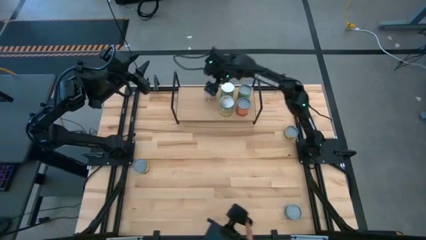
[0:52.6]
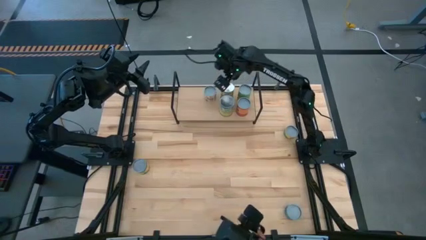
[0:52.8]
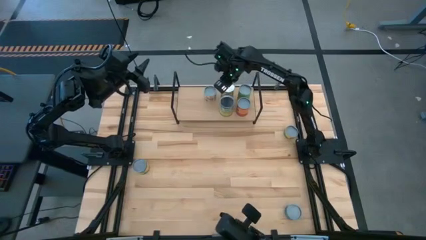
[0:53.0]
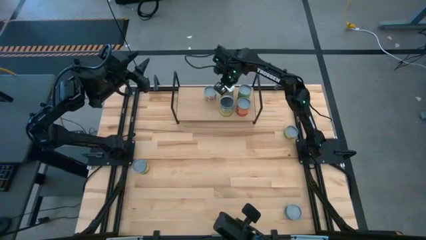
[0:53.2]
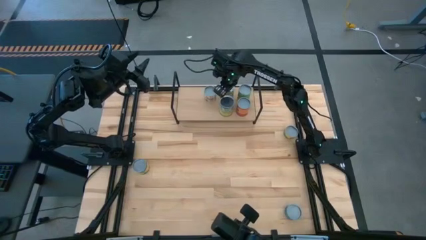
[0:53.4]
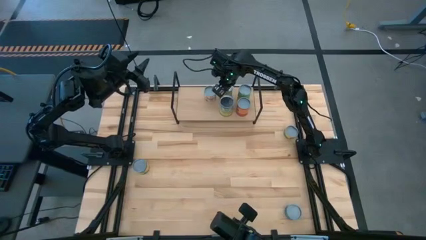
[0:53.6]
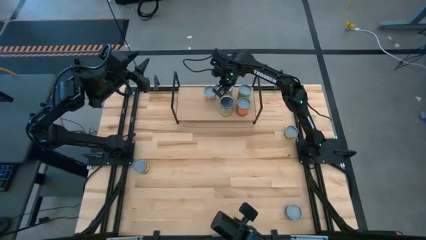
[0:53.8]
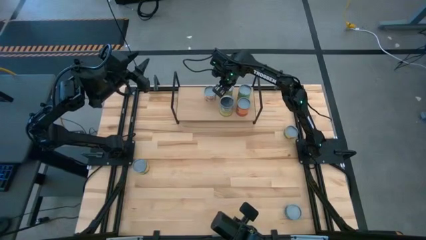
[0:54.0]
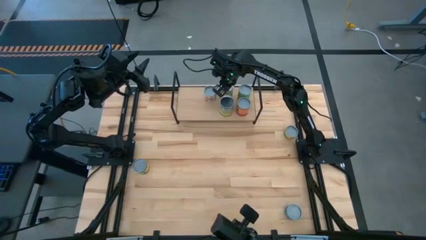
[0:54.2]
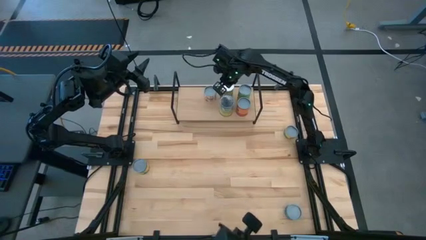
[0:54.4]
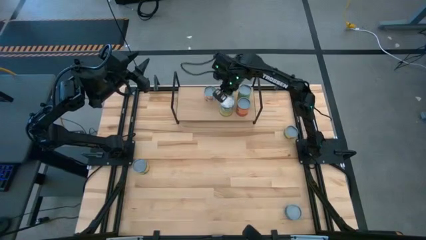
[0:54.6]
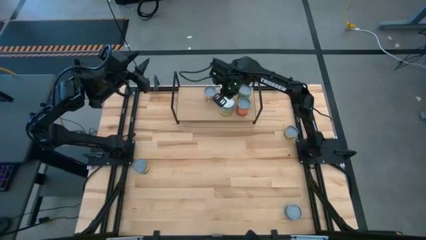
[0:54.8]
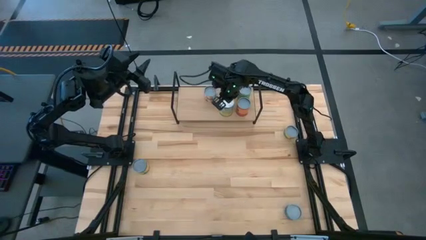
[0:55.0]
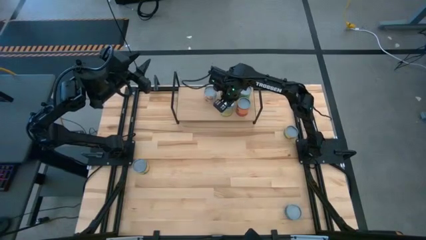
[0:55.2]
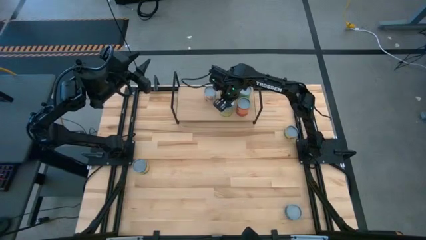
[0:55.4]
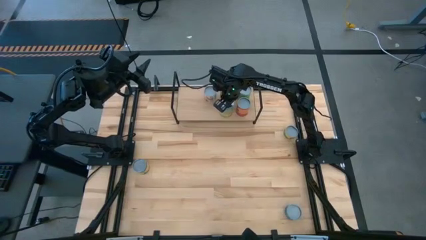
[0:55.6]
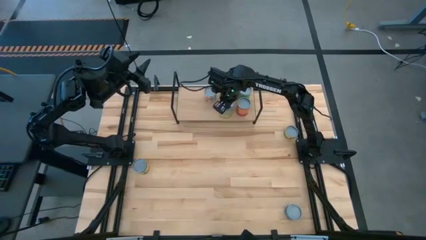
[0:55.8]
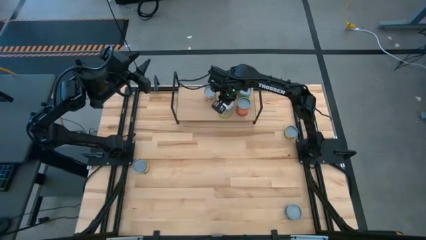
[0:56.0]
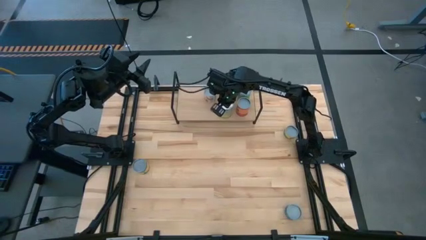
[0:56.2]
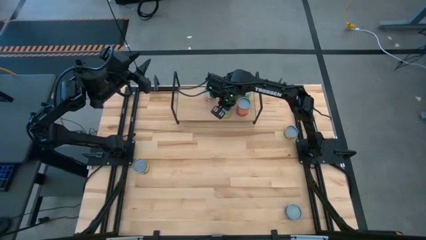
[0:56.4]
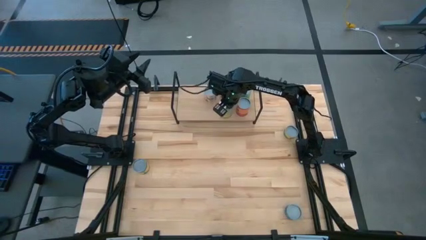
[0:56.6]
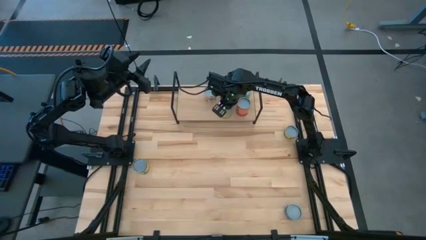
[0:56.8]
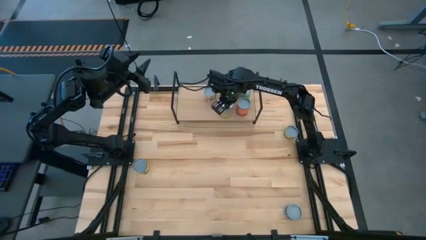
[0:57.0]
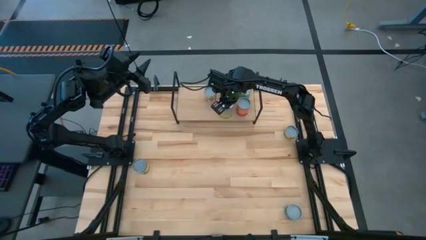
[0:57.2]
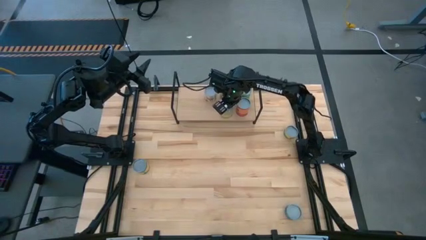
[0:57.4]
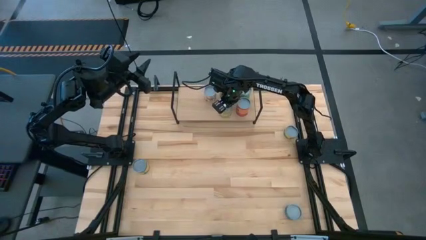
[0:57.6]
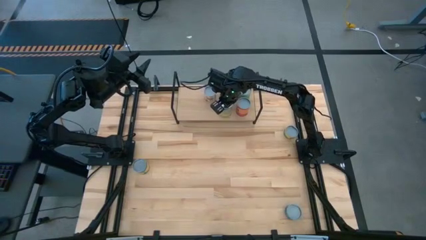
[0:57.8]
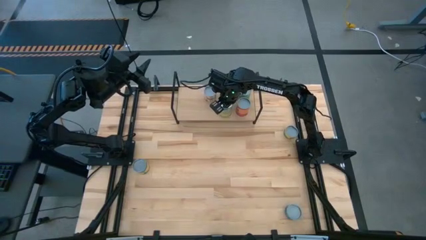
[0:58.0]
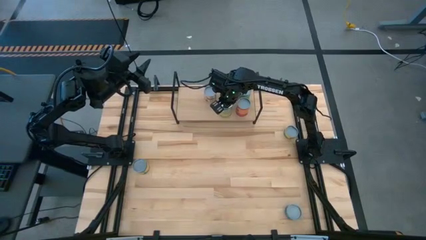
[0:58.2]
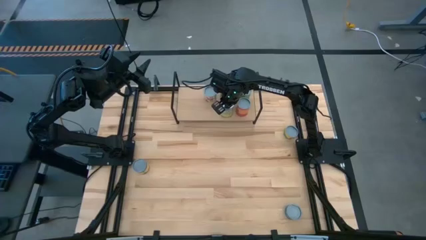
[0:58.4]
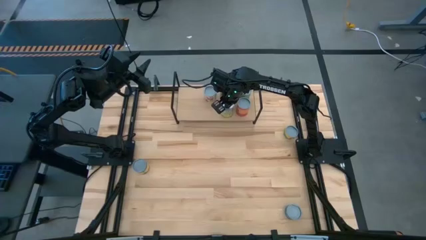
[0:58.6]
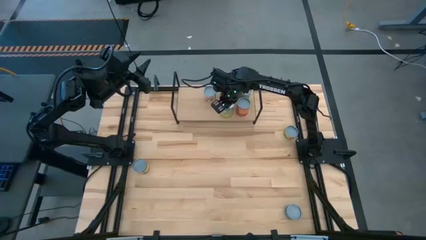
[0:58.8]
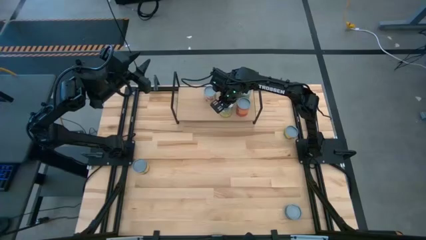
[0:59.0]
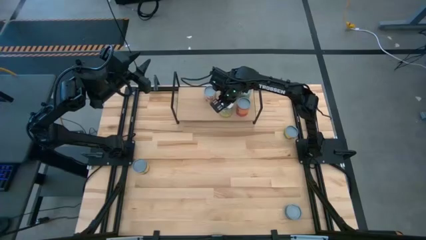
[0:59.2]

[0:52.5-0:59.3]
Task: Pick and place cans onto a shelf
Adjust the canned goods on the shelf

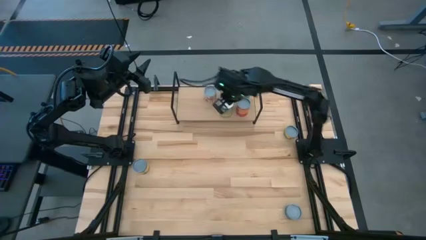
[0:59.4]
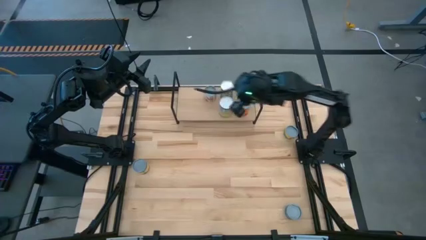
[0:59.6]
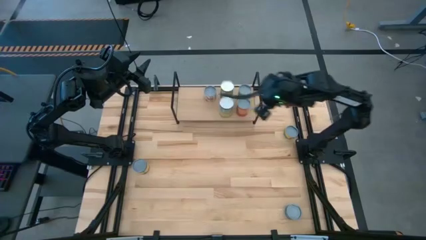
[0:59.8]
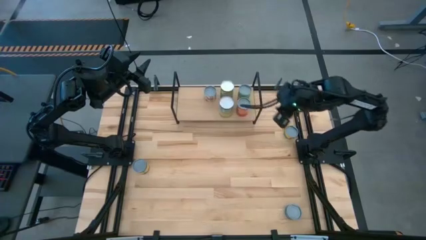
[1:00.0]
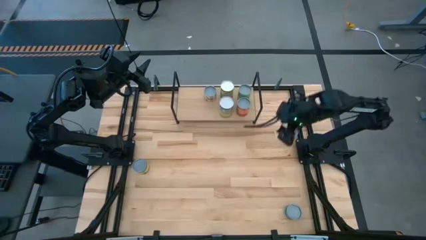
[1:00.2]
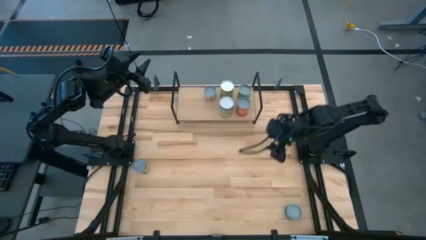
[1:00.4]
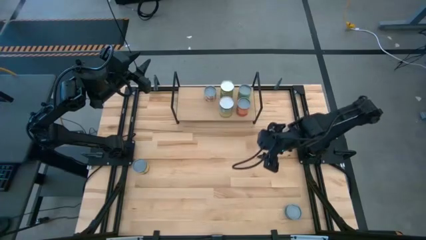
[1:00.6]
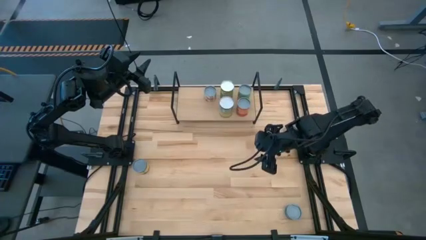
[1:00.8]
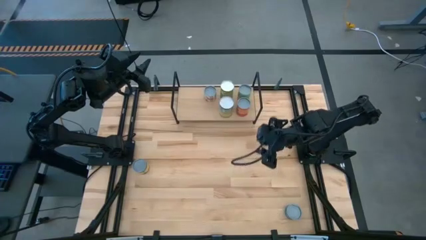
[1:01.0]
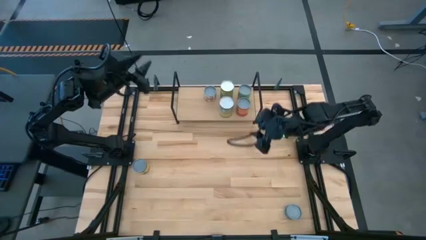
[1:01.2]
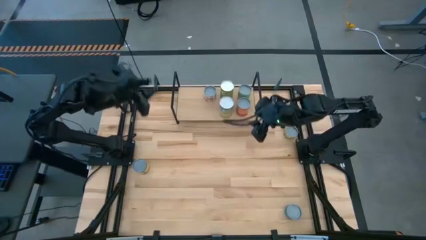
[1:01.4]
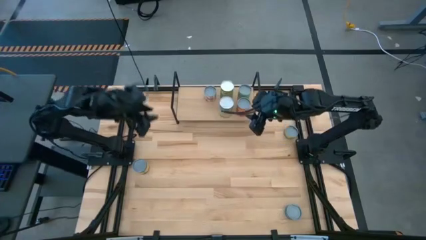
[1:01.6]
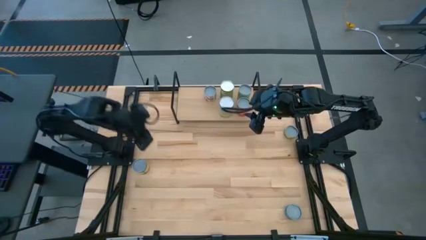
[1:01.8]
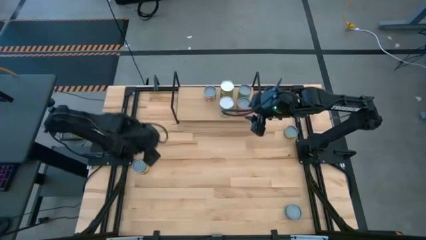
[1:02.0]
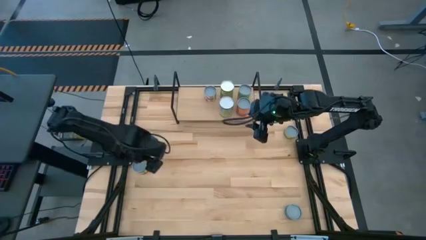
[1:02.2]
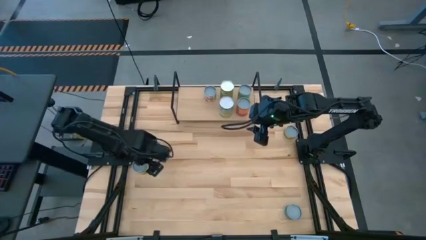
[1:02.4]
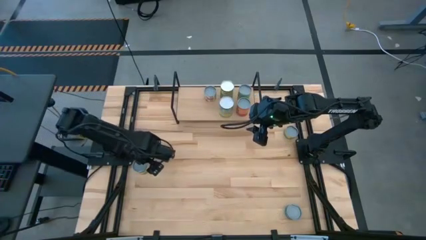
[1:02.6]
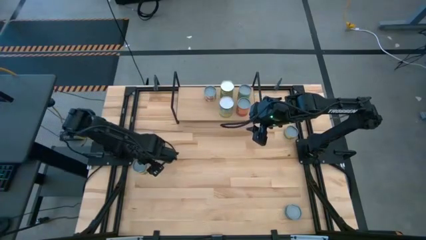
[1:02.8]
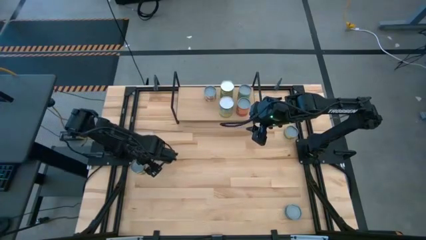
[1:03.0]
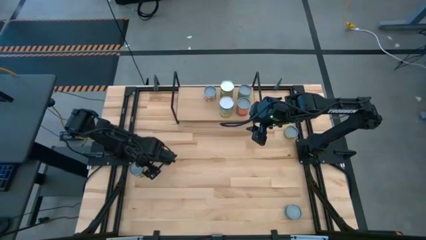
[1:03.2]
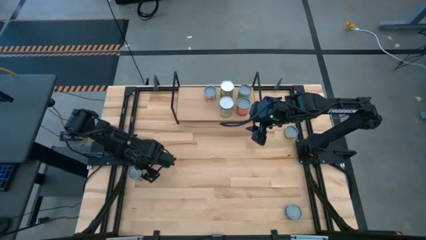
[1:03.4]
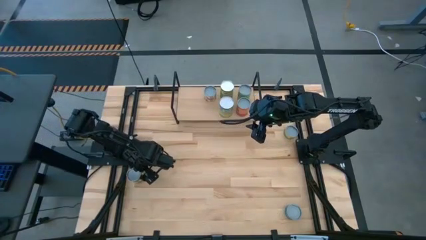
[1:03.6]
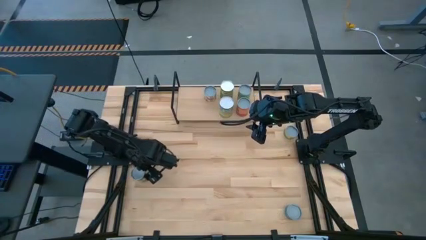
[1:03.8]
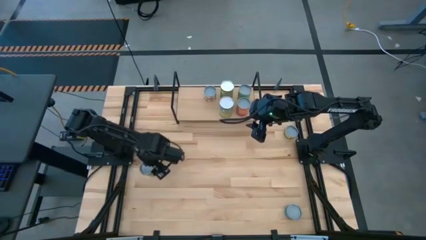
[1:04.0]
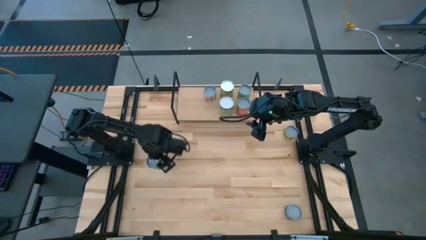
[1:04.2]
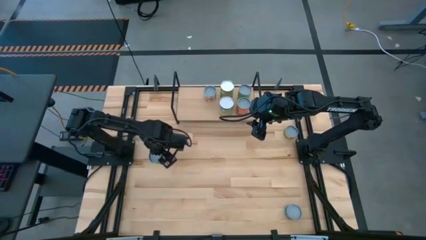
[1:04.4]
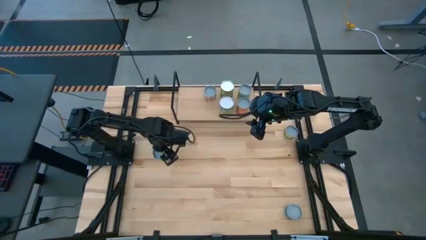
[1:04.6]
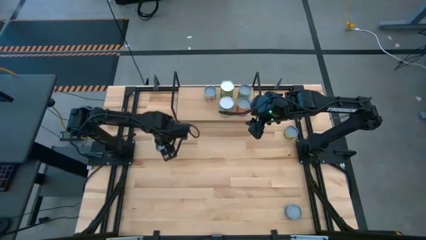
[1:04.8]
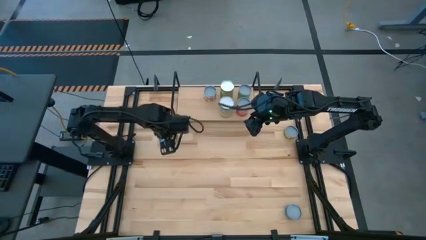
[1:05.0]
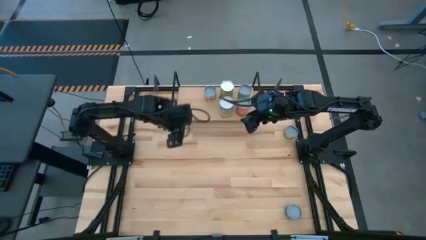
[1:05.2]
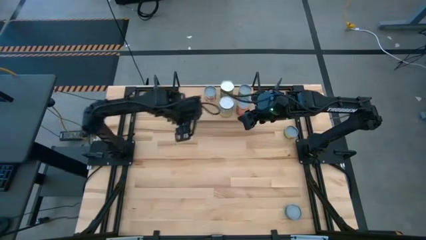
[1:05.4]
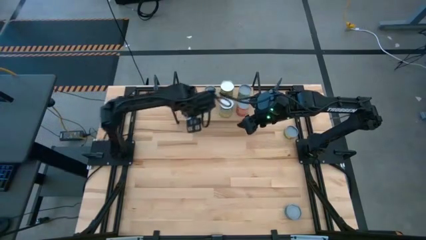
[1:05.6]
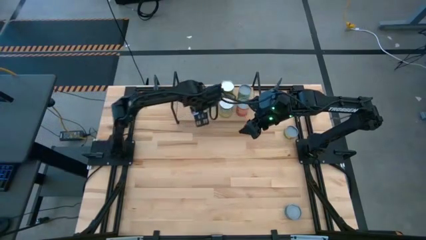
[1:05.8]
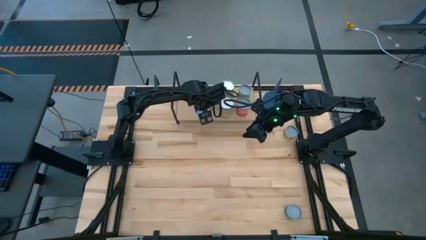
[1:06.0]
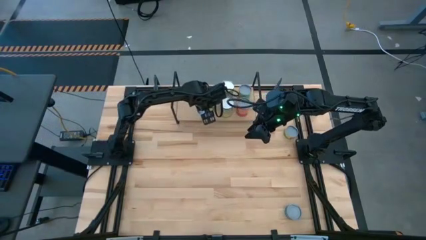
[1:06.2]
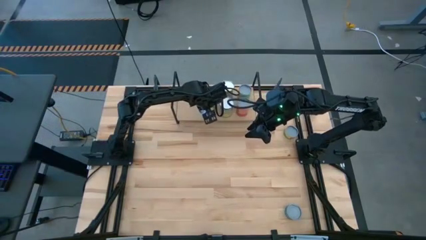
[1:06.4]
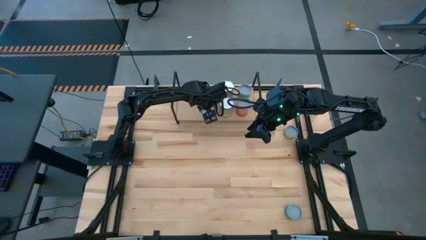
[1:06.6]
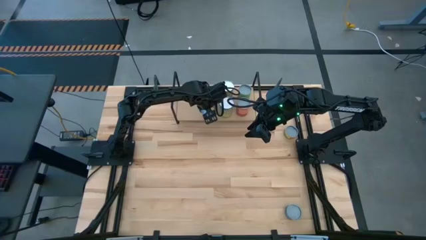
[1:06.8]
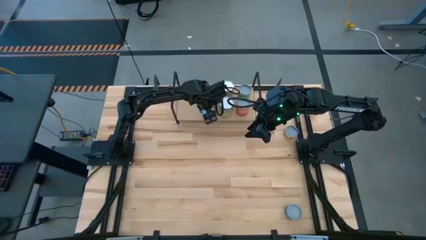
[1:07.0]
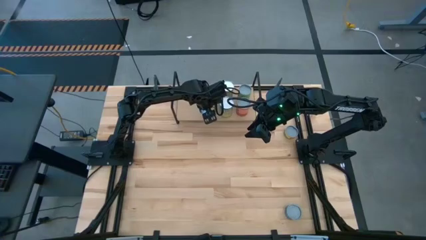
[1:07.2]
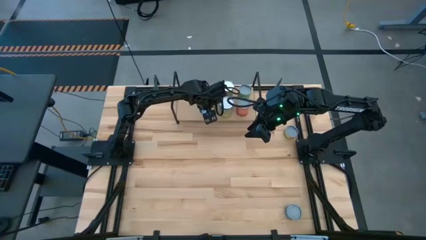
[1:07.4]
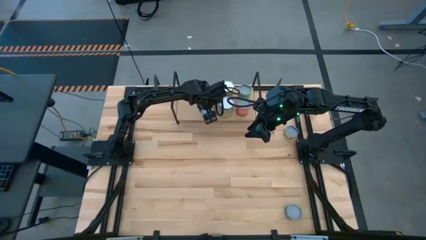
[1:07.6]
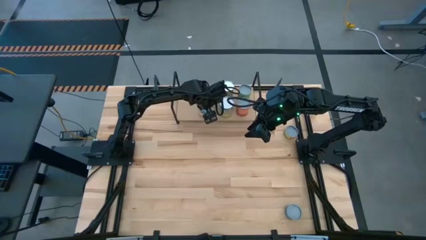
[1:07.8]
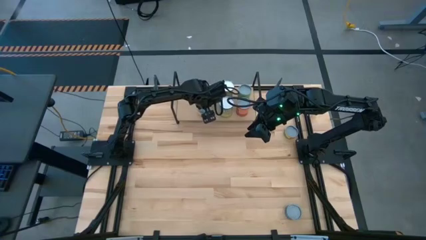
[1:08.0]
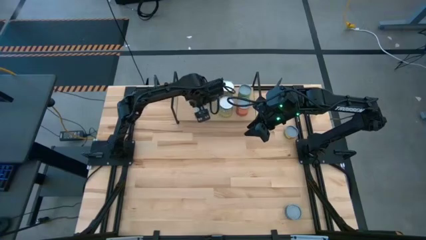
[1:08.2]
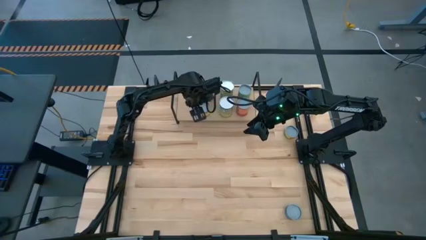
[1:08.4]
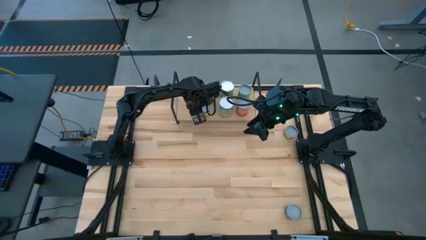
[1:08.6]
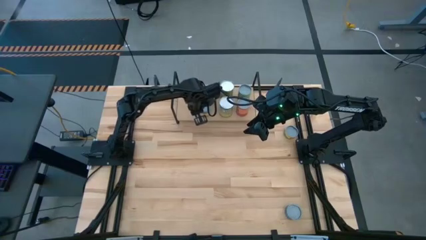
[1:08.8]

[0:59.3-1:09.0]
Put the canned peaches on the shelf
